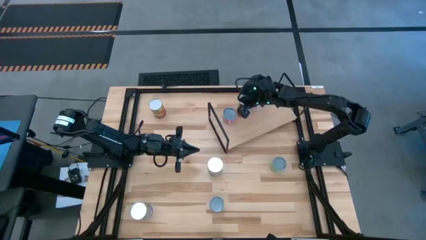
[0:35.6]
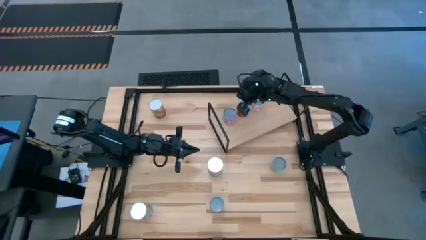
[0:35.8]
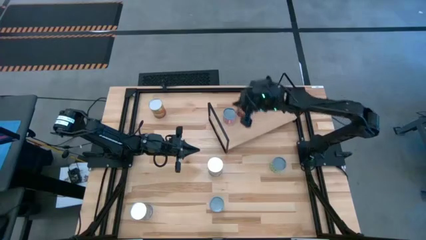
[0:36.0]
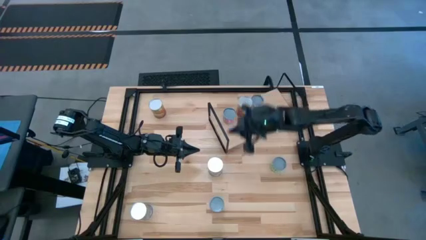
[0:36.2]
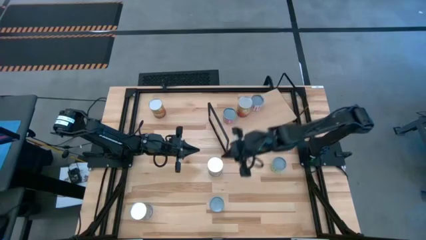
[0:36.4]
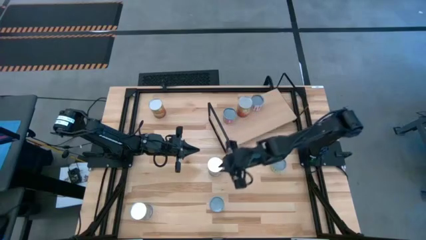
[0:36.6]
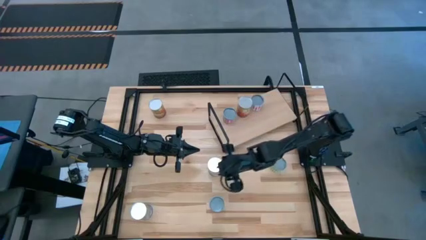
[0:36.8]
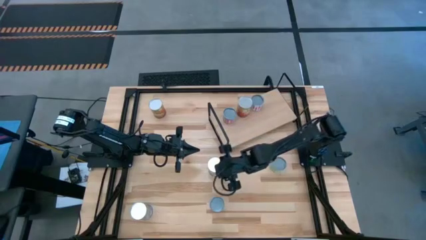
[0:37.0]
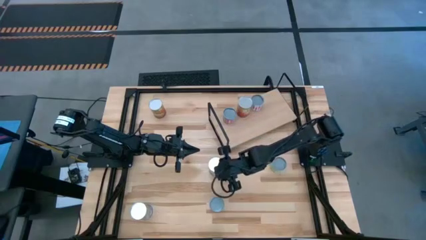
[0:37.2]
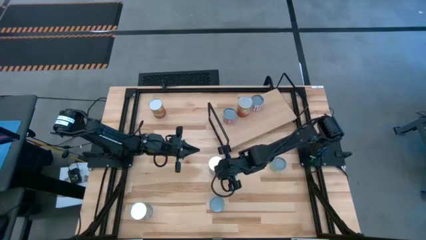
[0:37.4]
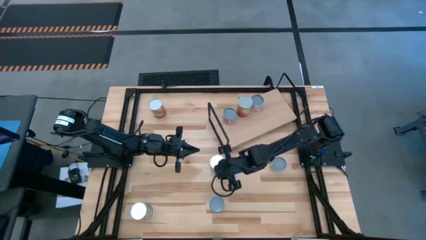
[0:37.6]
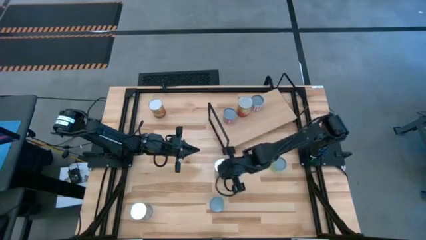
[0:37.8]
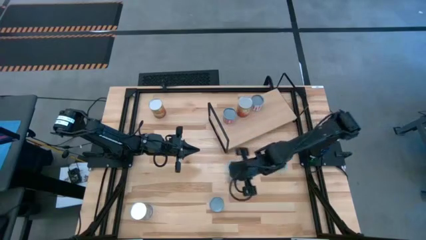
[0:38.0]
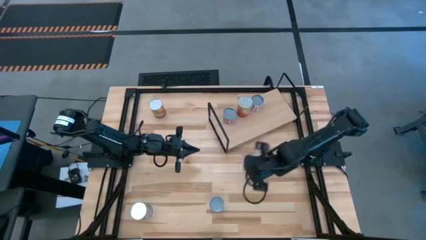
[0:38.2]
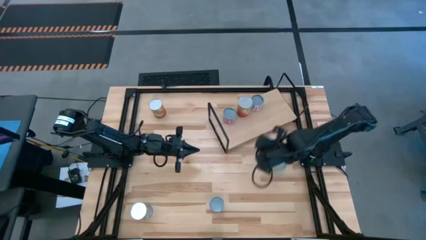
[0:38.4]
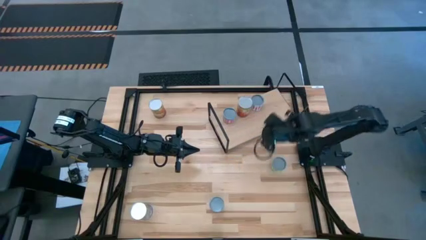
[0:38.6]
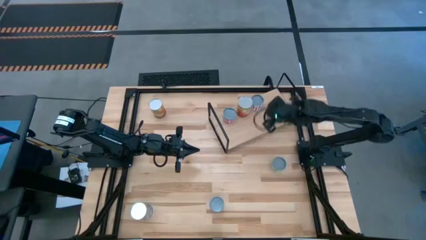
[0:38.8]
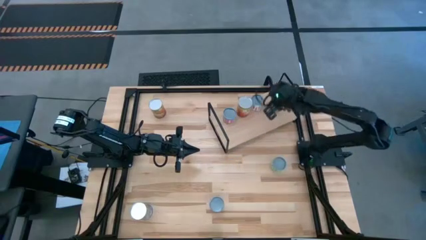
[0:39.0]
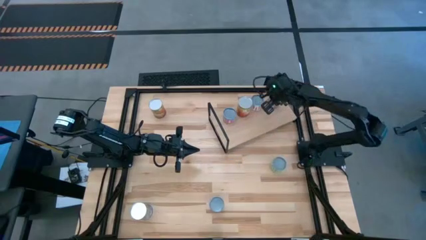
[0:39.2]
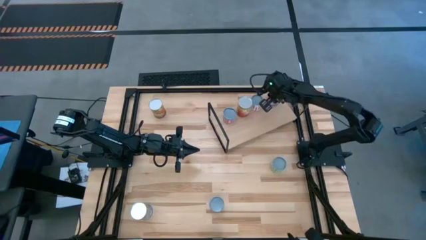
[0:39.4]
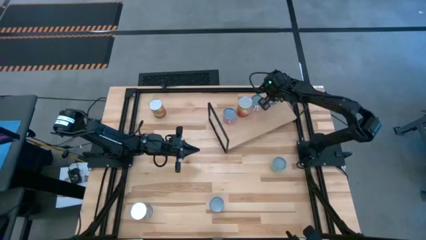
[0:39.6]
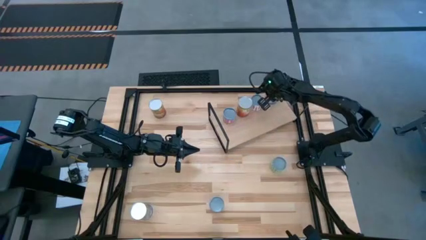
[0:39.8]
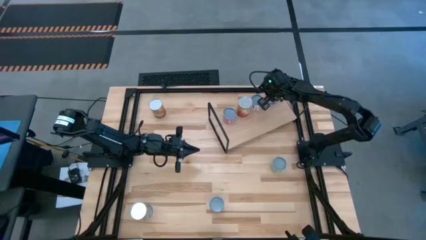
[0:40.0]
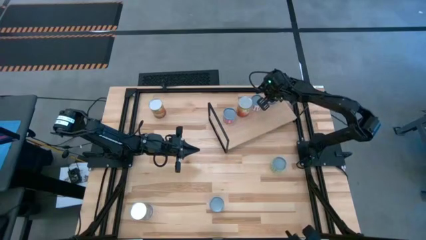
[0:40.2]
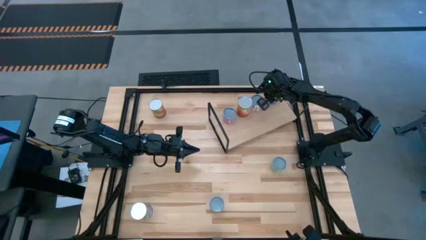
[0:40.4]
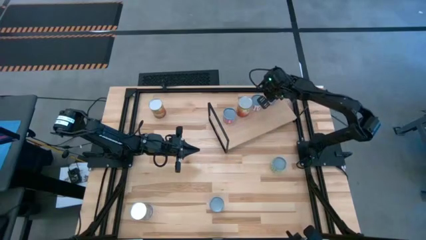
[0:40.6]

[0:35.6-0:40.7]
Task: Pick and place cans onto a shelf
Put the top canned peaches on the shelf

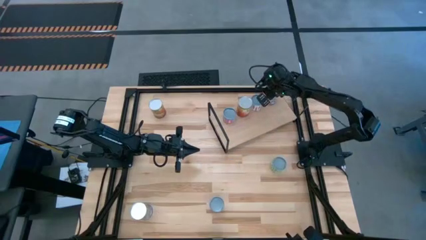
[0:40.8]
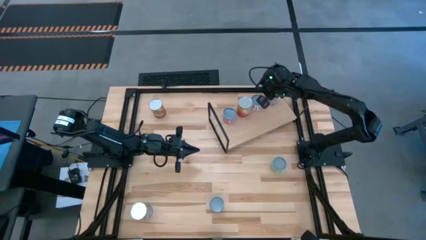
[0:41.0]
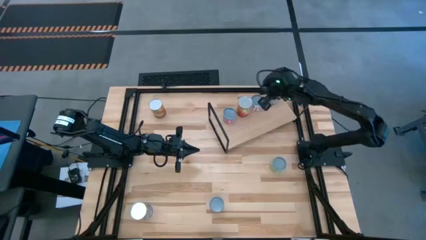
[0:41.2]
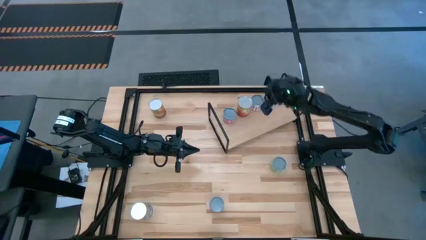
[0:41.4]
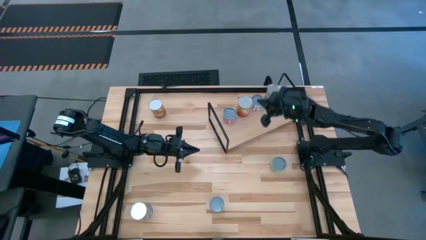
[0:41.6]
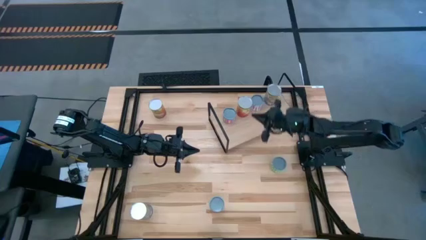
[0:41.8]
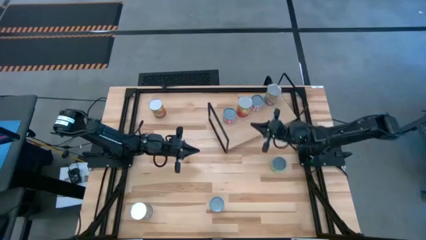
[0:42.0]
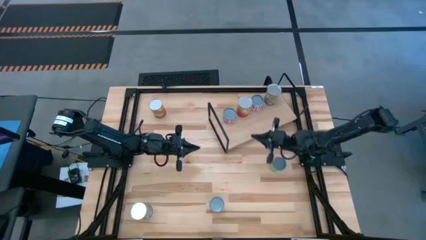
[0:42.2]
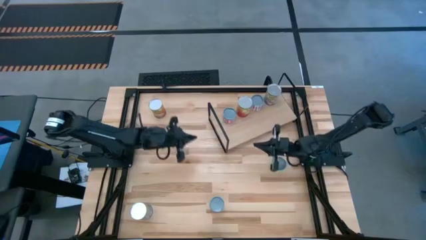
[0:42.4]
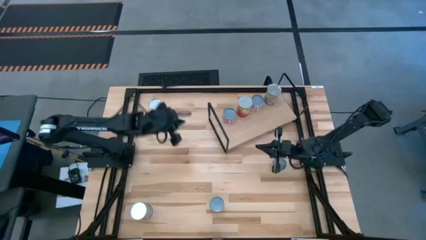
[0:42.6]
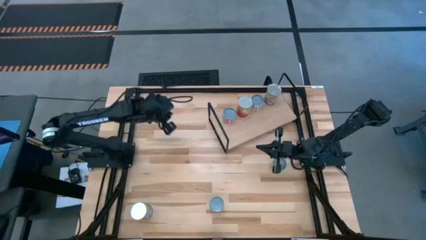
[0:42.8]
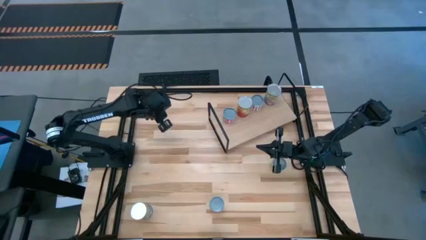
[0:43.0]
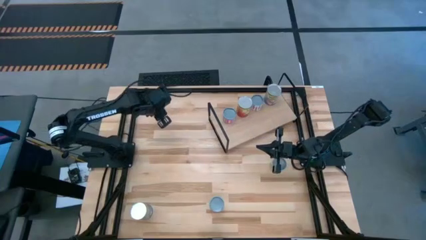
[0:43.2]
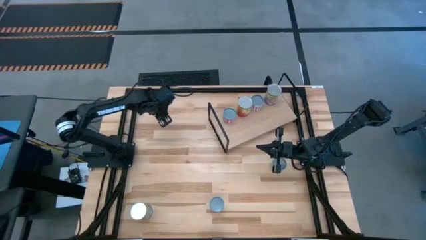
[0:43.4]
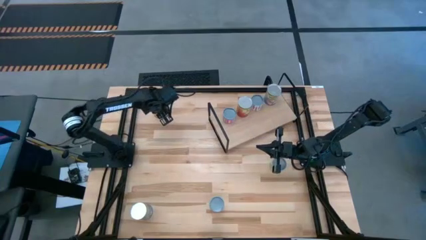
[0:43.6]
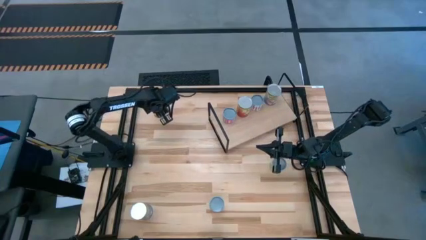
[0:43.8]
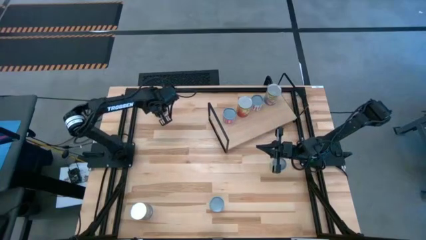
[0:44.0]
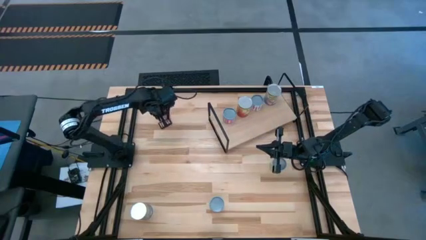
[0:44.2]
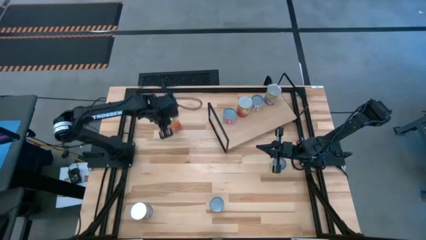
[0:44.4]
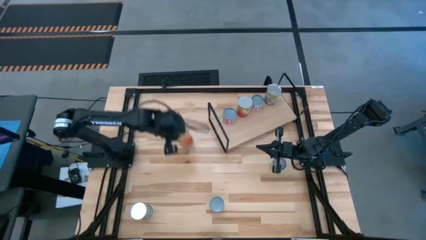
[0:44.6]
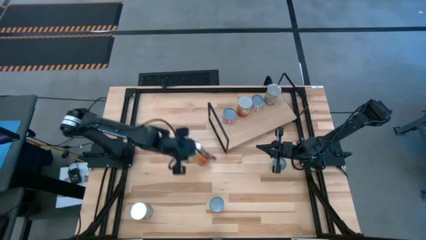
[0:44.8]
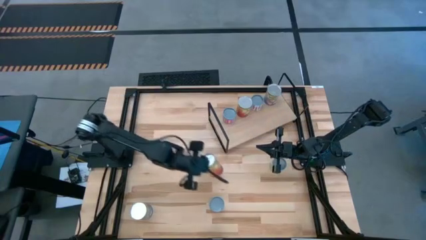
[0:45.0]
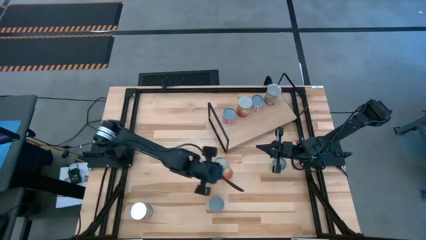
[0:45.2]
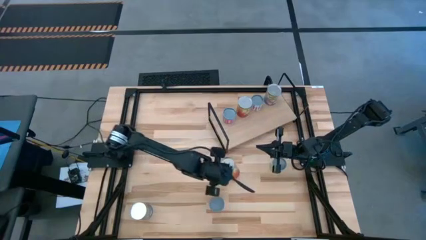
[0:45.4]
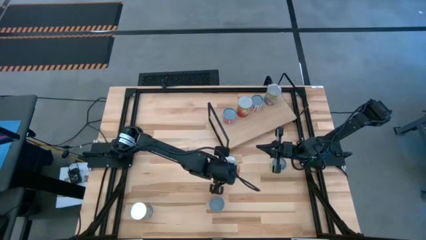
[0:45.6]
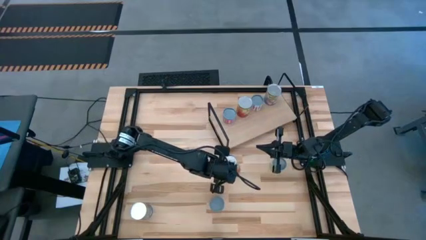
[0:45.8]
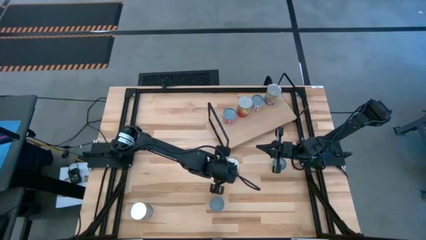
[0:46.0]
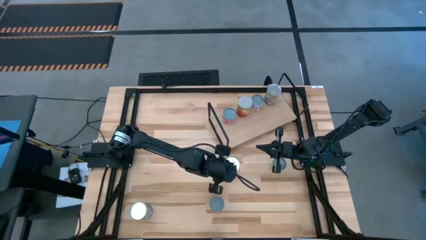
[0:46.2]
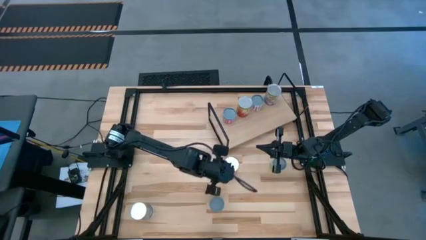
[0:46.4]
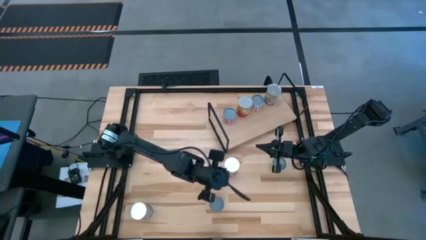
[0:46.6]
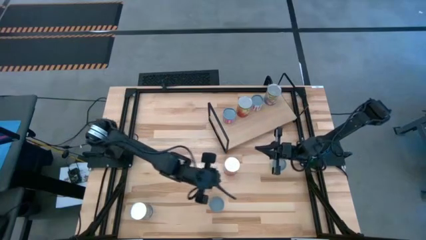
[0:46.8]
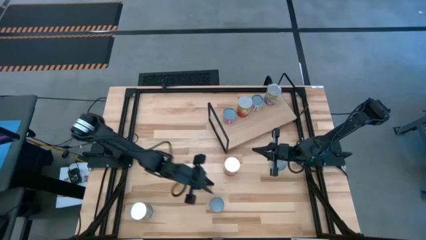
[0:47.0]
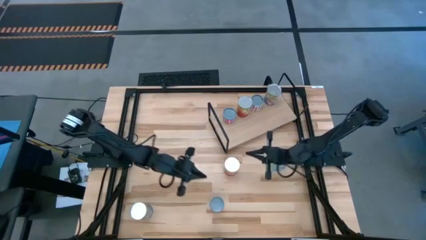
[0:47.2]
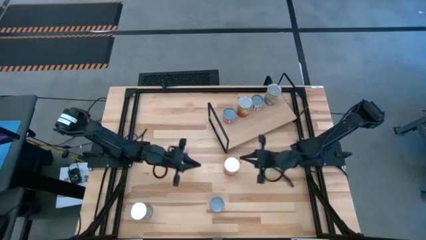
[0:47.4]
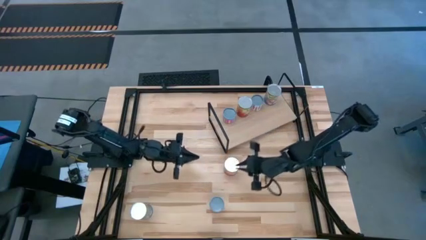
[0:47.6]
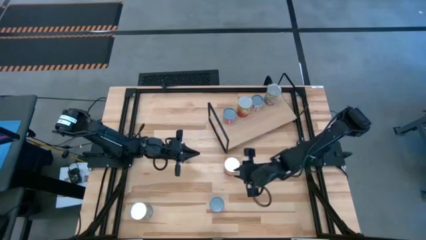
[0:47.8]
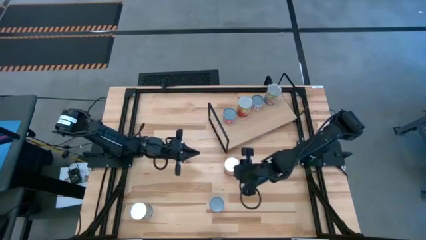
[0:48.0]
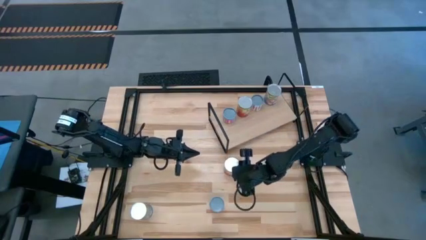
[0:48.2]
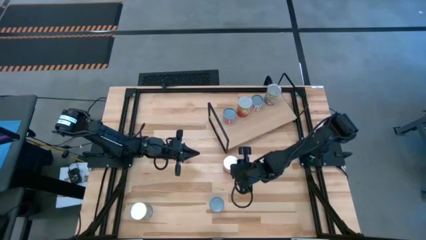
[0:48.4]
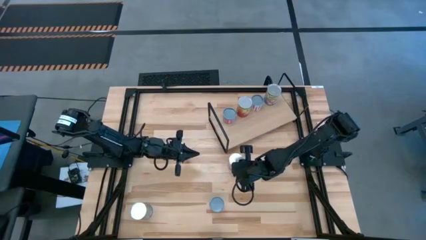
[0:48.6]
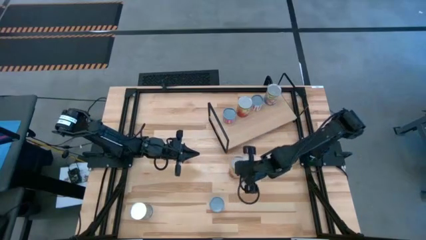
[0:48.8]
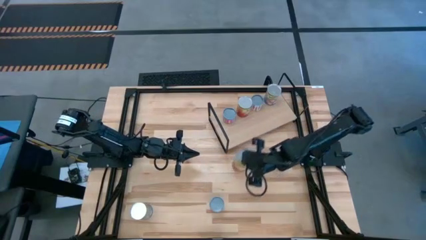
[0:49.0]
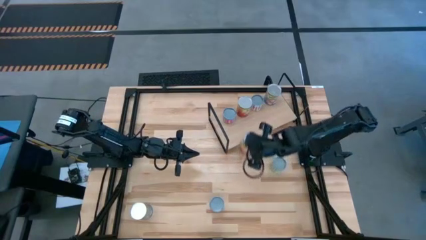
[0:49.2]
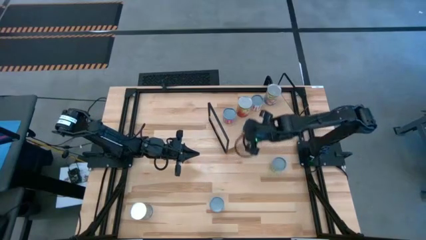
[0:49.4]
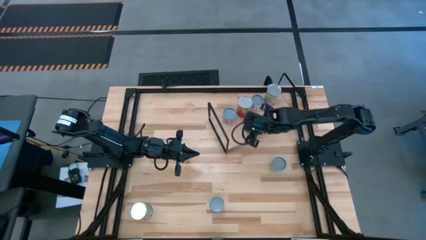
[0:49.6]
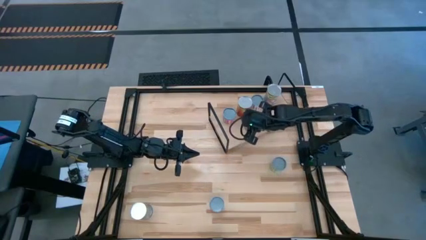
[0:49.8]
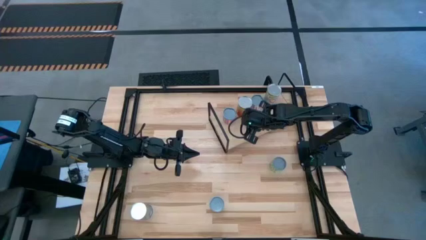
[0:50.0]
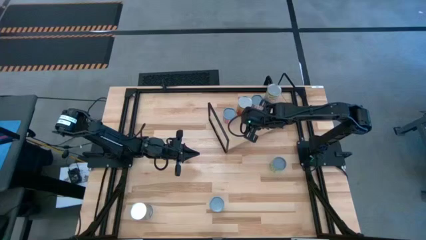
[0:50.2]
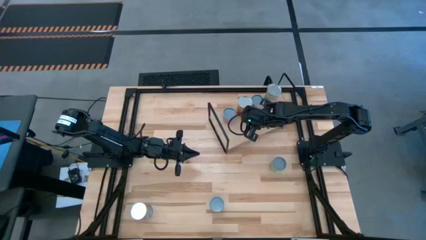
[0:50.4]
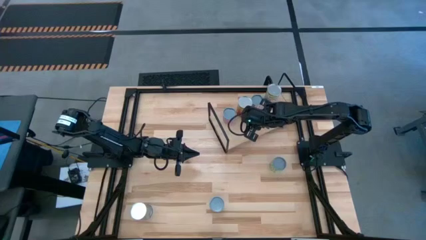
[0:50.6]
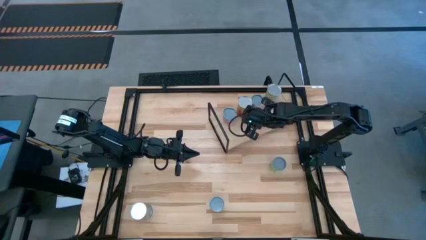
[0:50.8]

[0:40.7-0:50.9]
Put the canned corn on the shelf

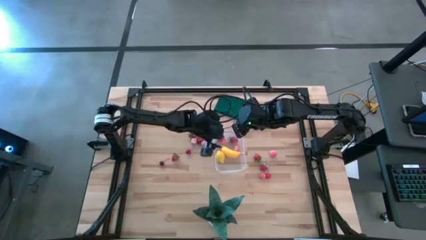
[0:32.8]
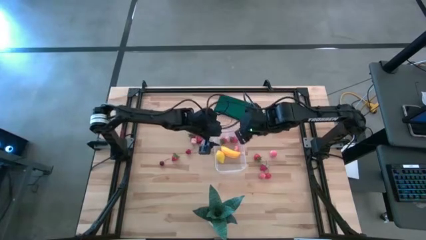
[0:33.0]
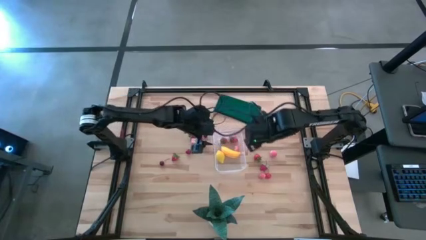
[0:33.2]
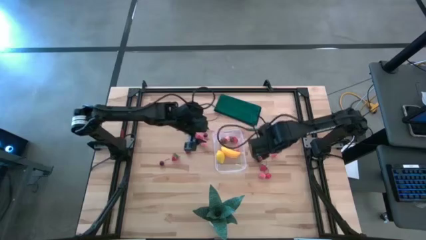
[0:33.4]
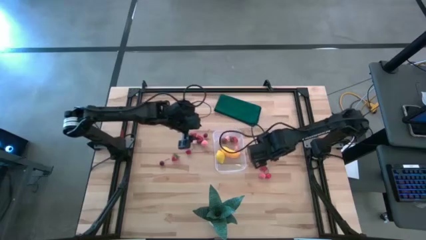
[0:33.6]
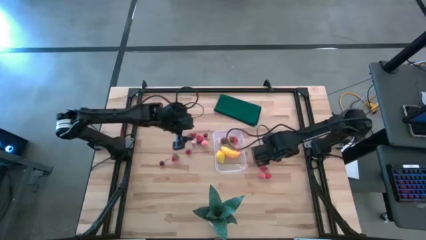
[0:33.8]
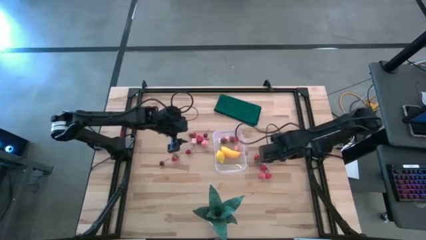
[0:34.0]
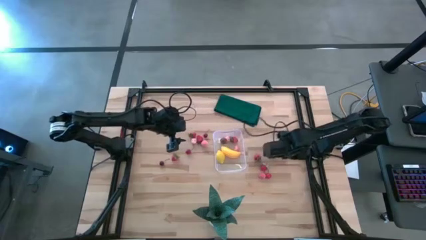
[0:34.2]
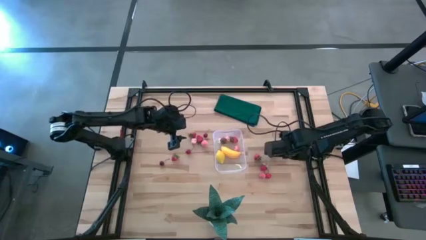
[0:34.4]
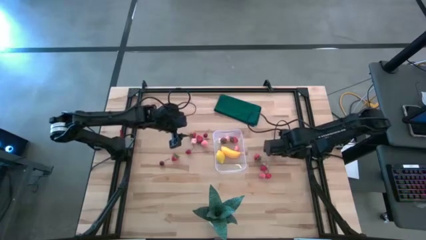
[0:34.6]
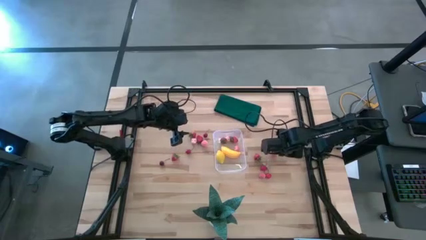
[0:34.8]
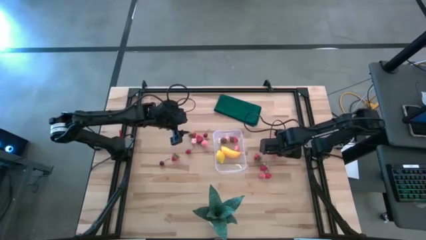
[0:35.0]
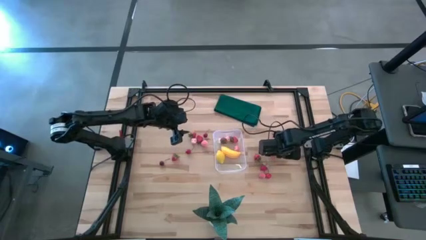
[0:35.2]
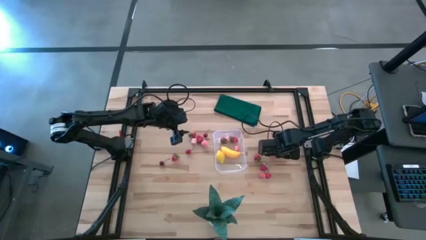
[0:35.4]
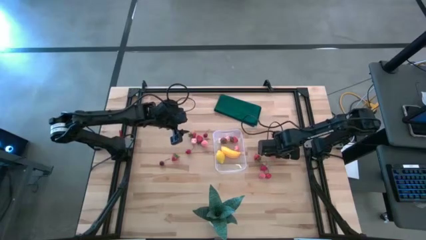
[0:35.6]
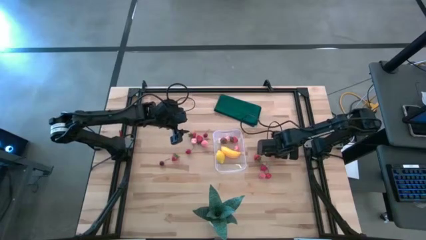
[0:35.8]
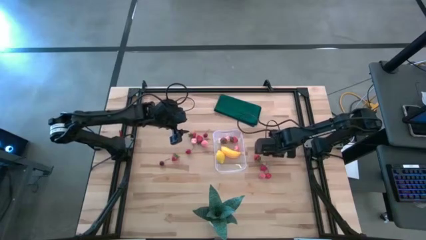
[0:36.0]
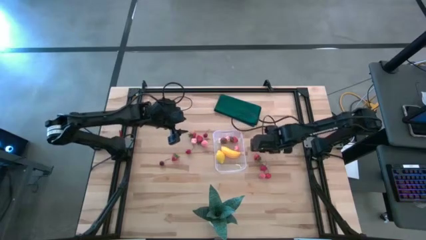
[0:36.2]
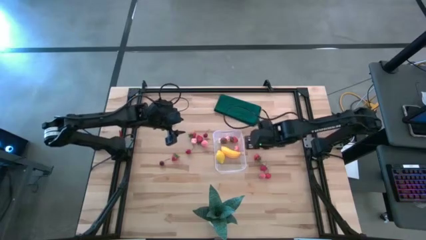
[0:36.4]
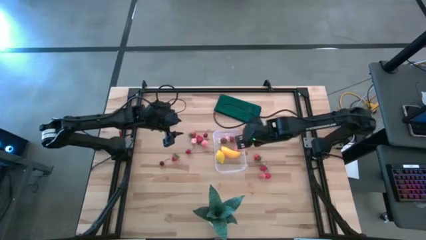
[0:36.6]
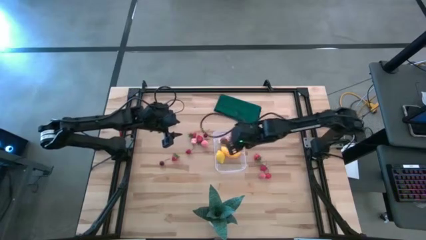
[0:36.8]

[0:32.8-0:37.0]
Task: Pick and placing Produce into tupperware
Put the peach into the transparent bin
